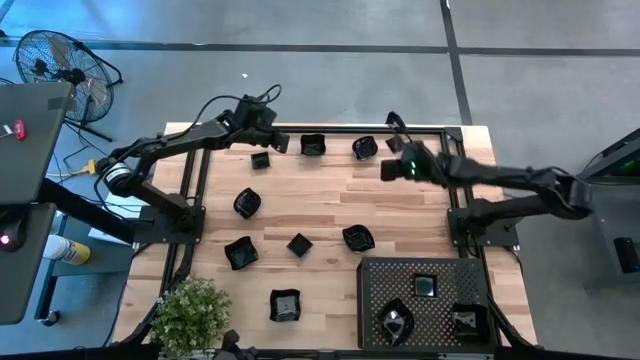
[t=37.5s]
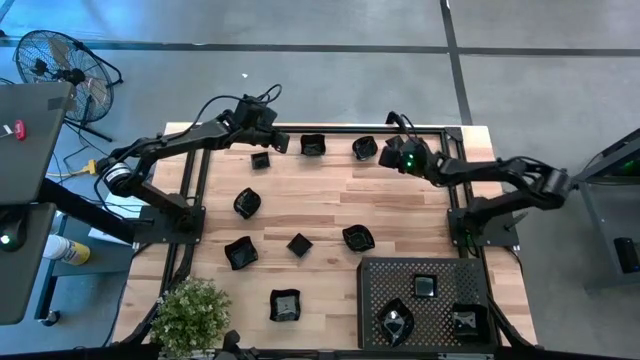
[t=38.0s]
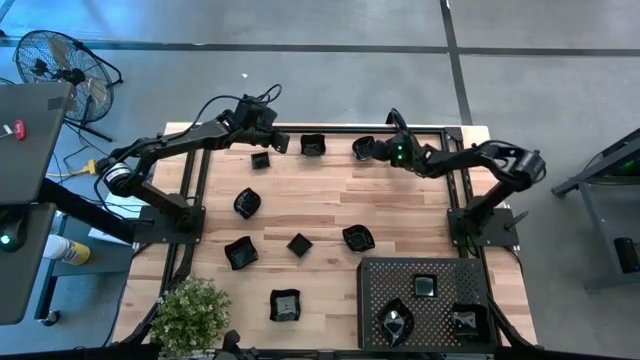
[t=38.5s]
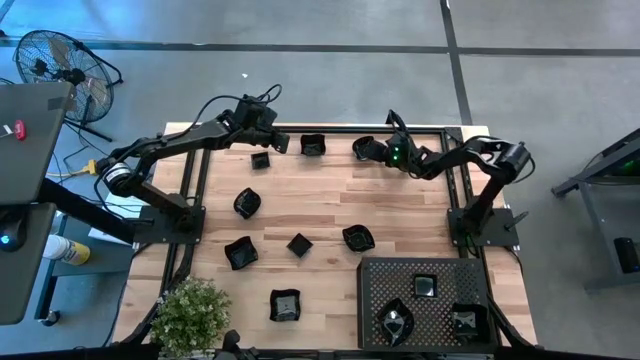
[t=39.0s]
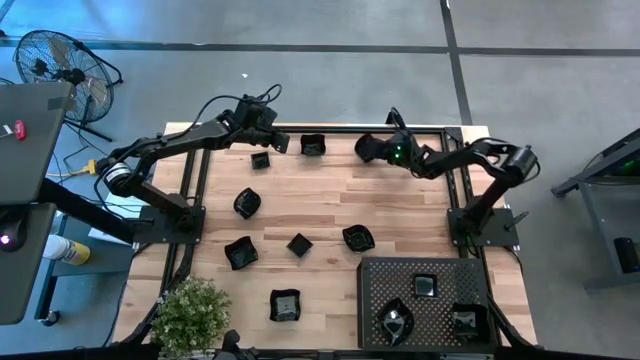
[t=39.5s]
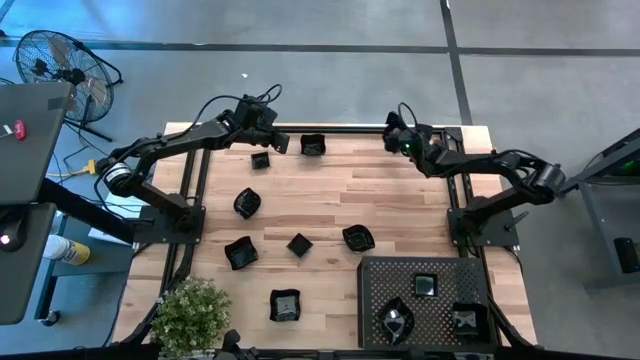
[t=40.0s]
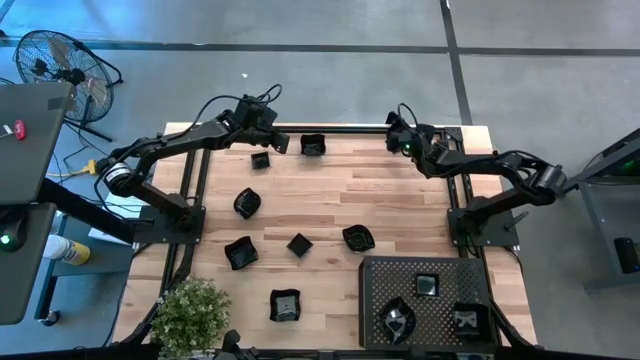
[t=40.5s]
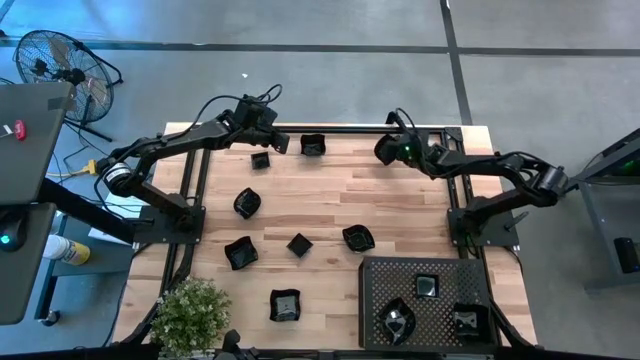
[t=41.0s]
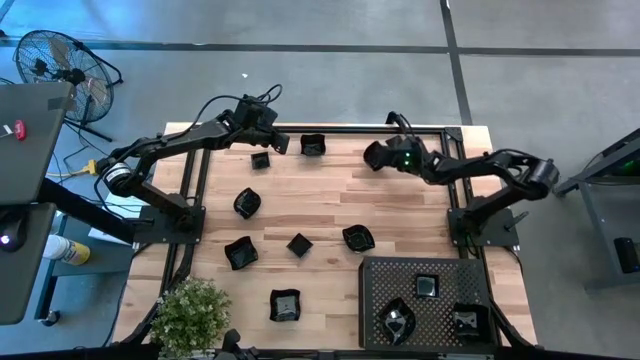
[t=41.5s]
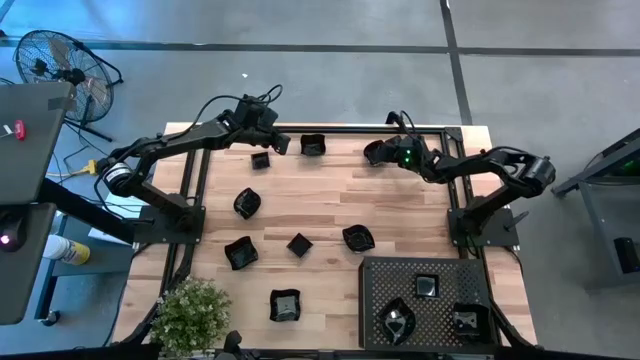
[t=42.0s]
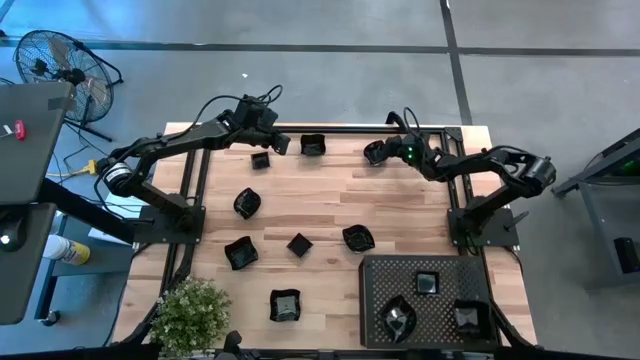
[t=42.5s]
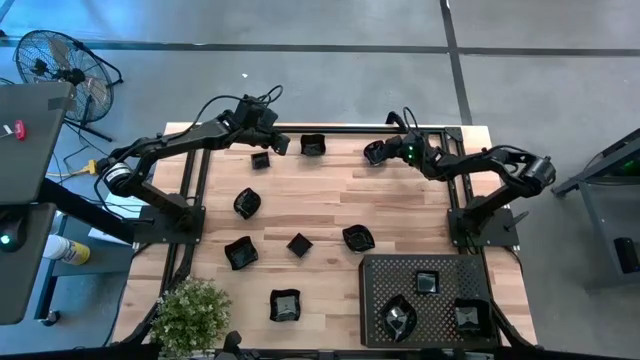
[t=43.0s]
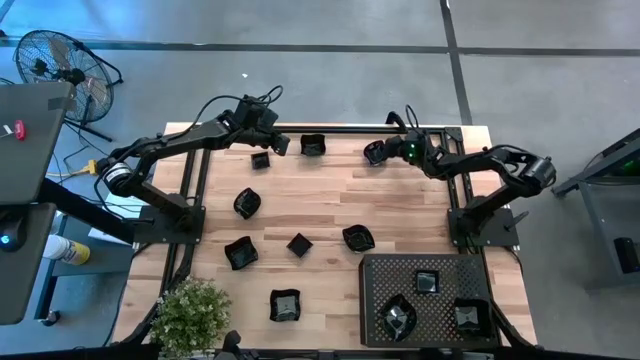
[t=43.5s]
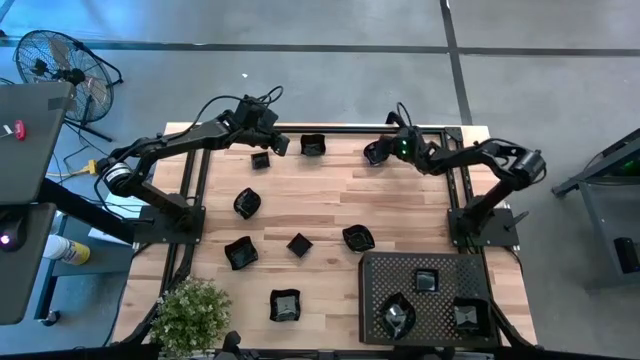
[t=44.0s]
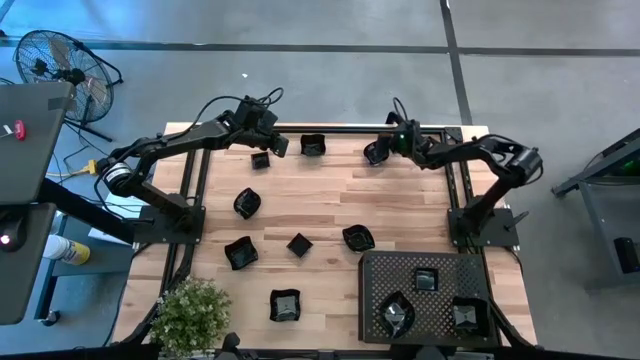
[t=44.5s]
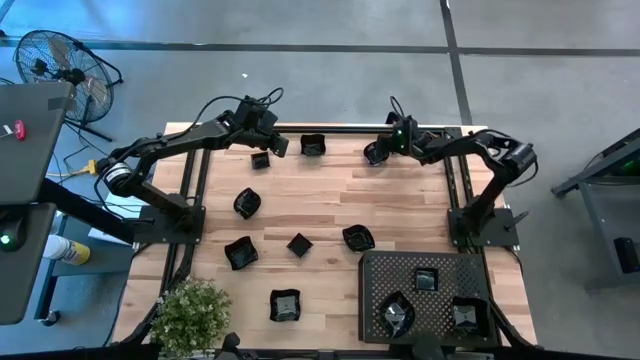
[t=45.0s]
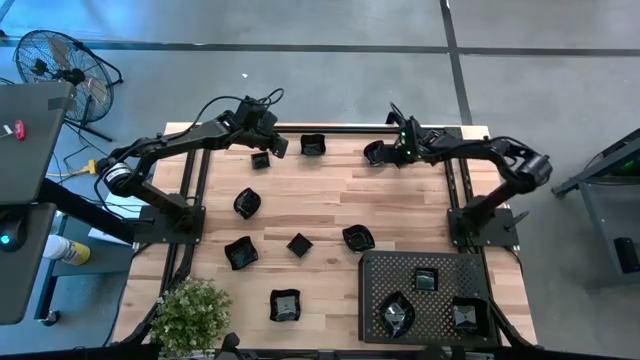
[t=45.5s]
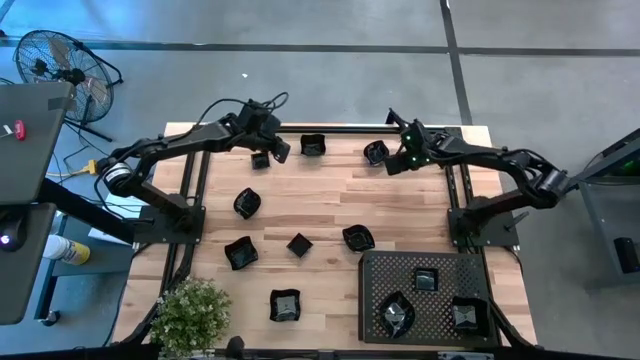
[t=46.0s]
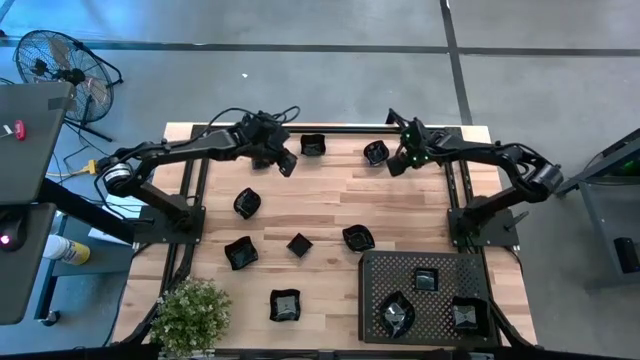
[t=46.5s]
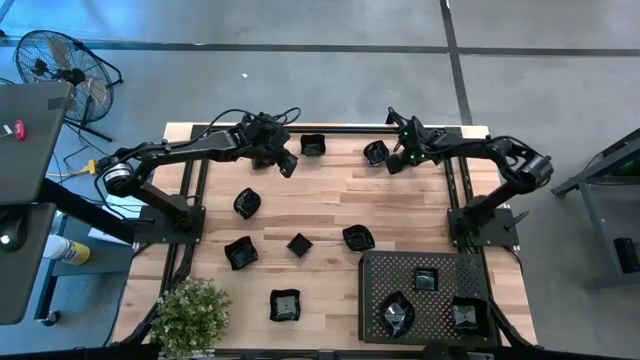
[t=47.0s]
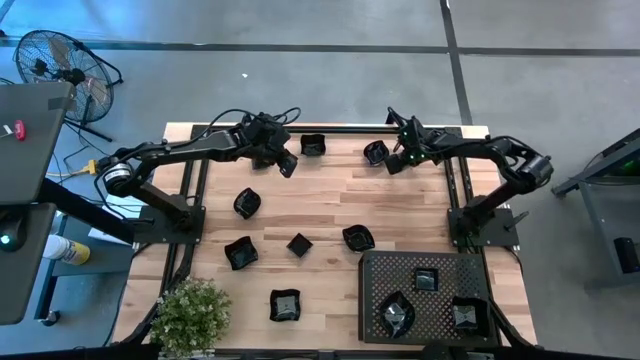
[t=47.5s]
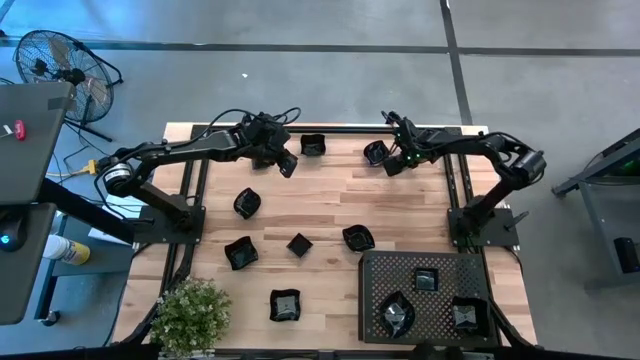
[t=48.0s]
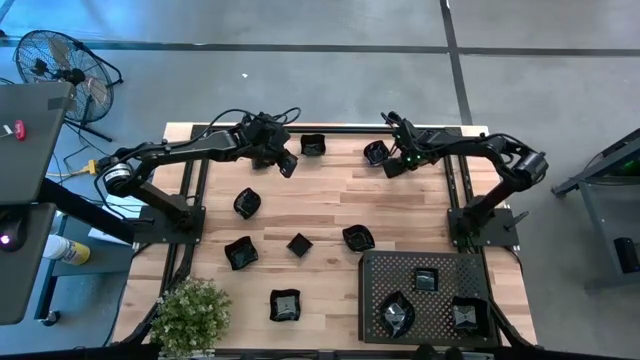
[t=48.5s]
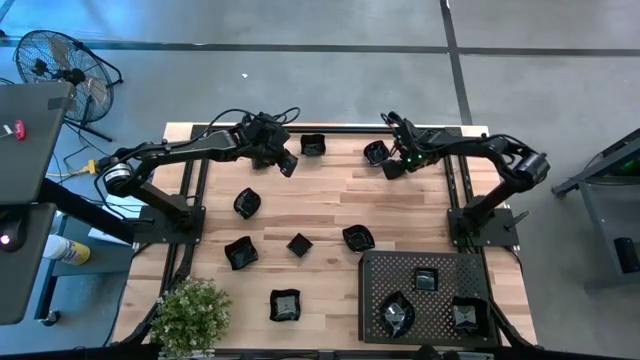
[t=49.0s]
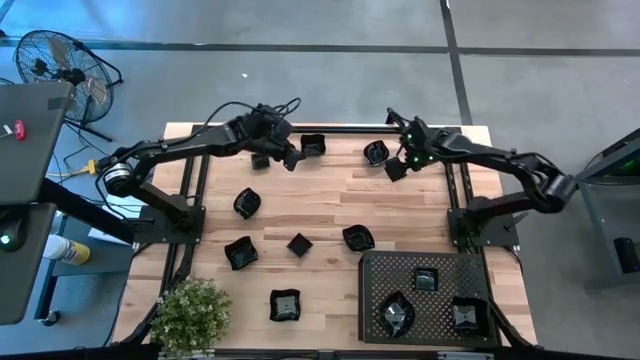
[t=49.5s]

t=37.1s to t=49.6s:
Task: Pick & Place Mini shaped plates
Stack the black square plate on top of the black square plate on the shelf

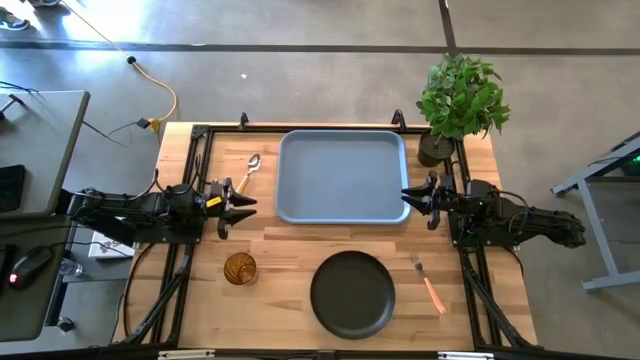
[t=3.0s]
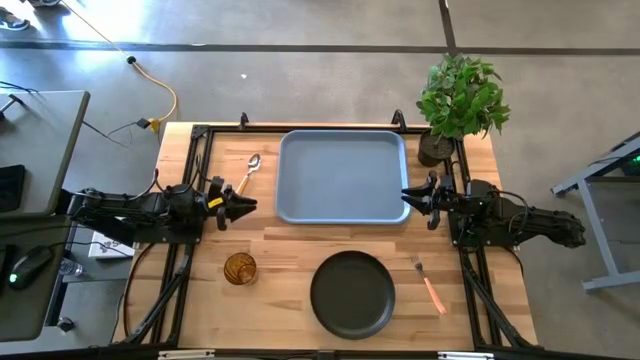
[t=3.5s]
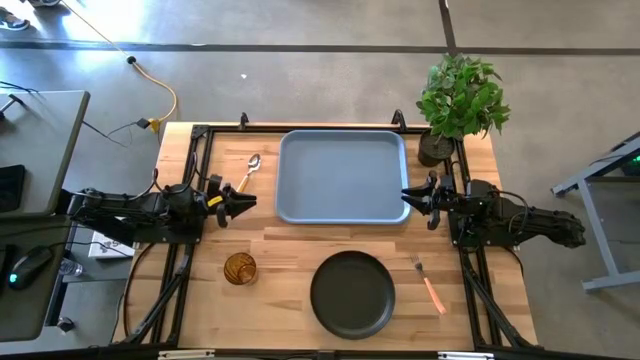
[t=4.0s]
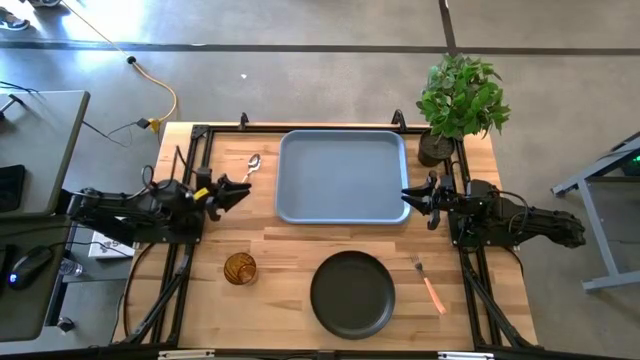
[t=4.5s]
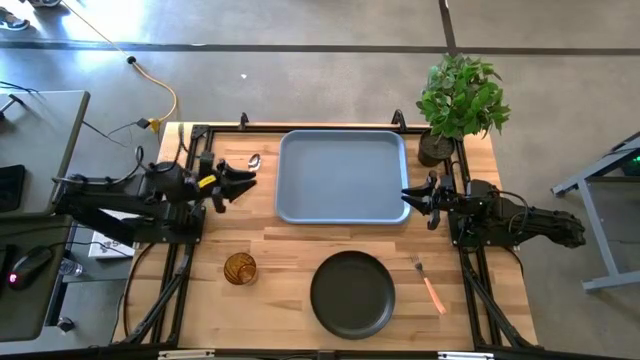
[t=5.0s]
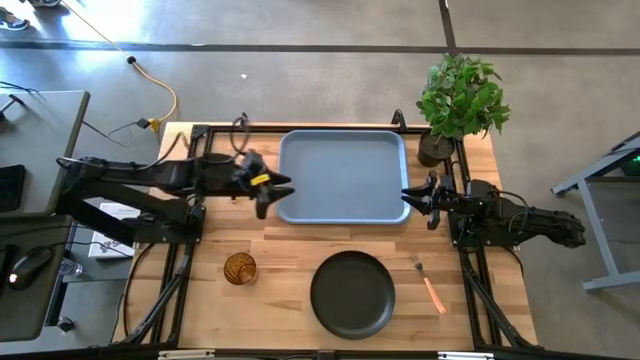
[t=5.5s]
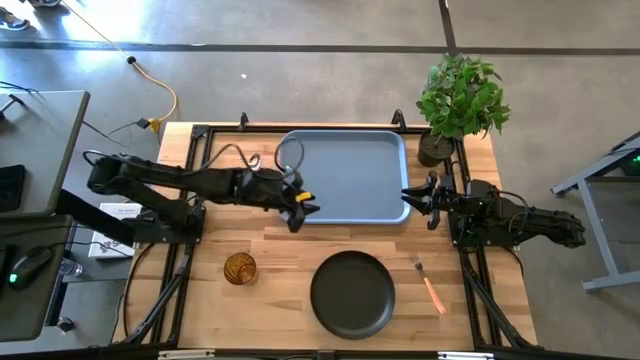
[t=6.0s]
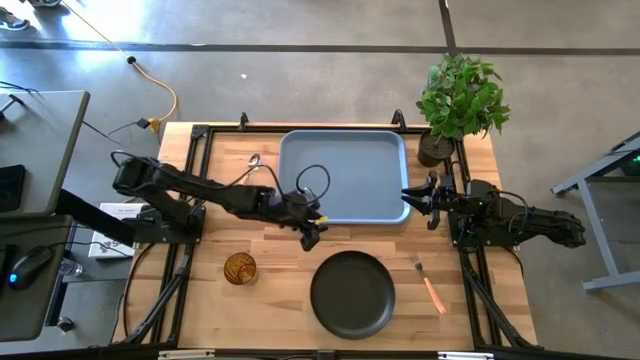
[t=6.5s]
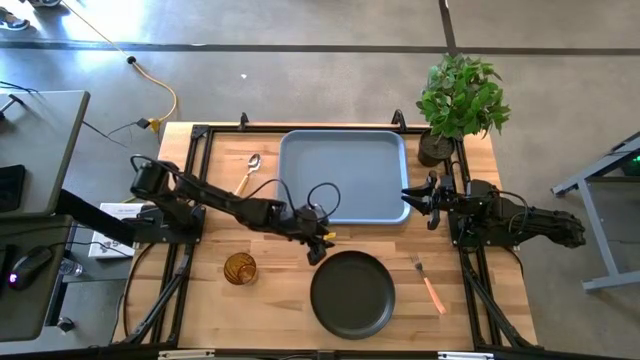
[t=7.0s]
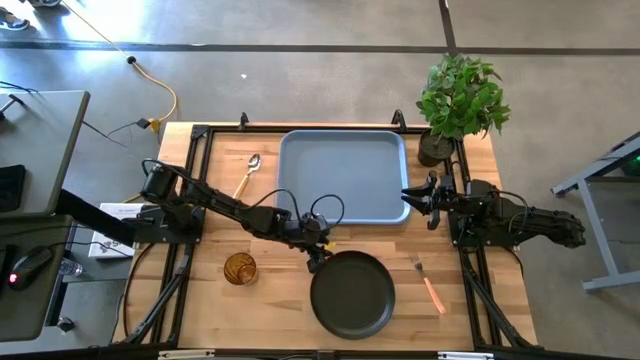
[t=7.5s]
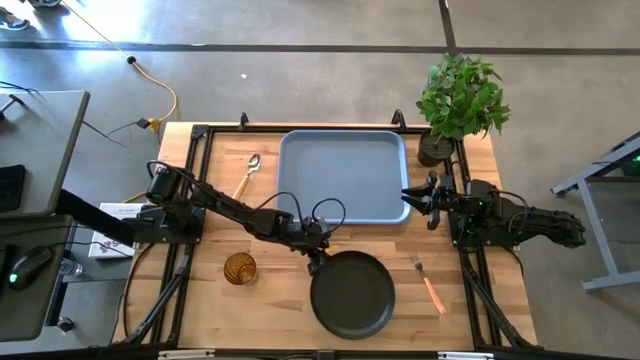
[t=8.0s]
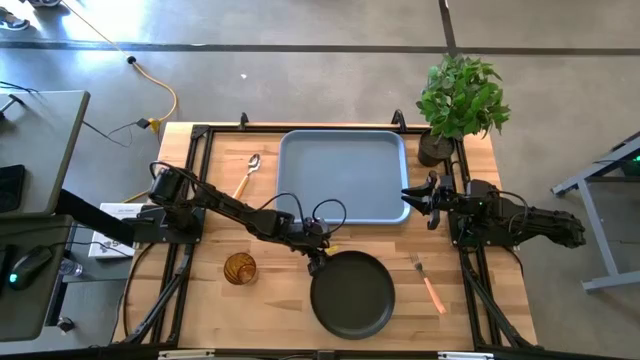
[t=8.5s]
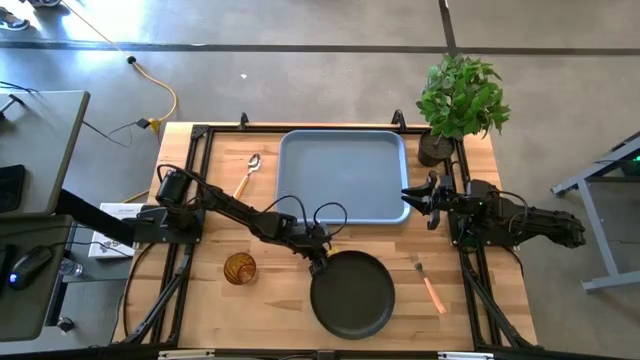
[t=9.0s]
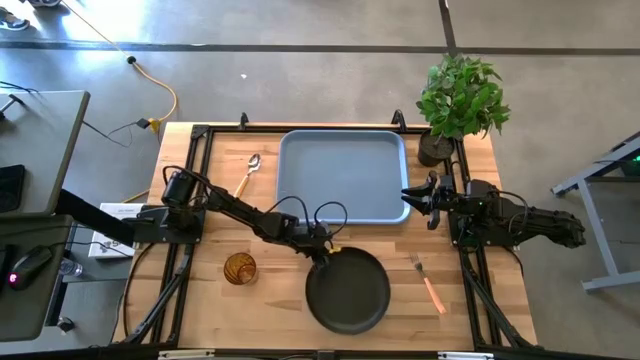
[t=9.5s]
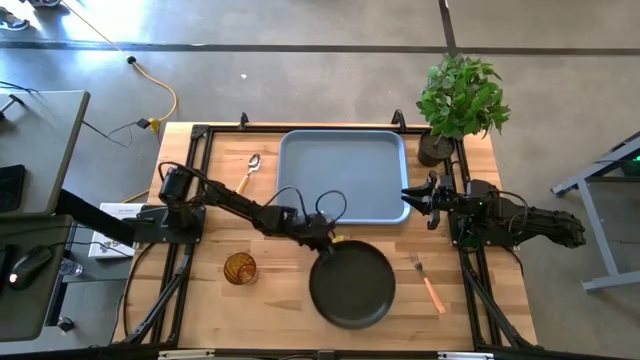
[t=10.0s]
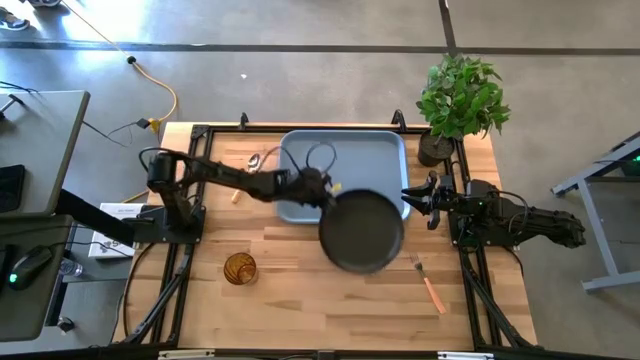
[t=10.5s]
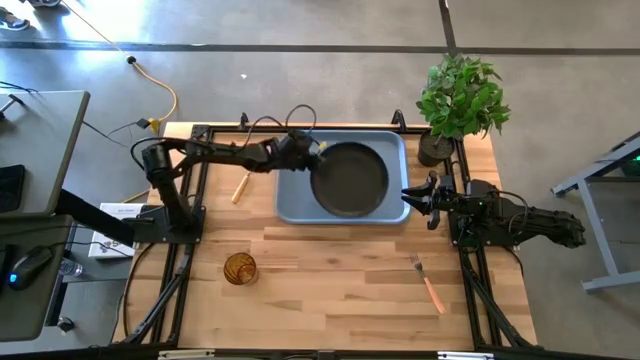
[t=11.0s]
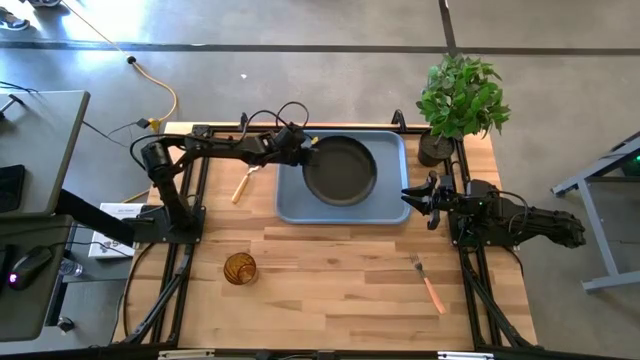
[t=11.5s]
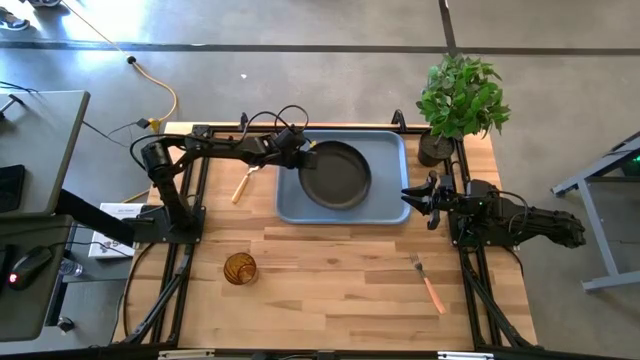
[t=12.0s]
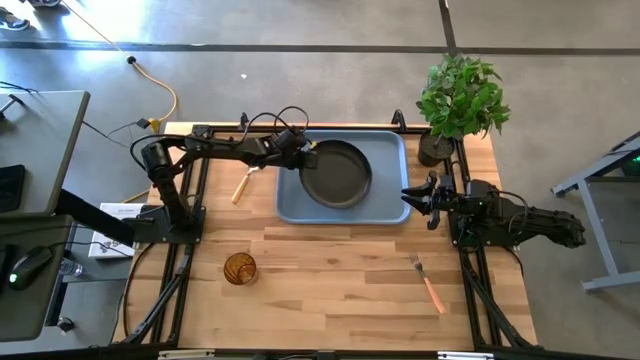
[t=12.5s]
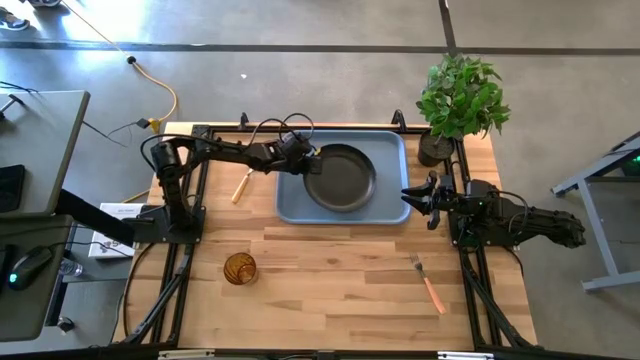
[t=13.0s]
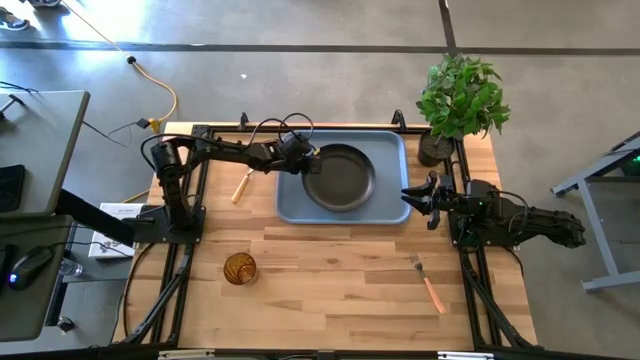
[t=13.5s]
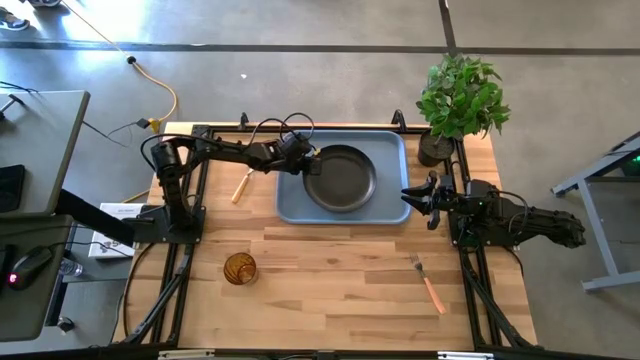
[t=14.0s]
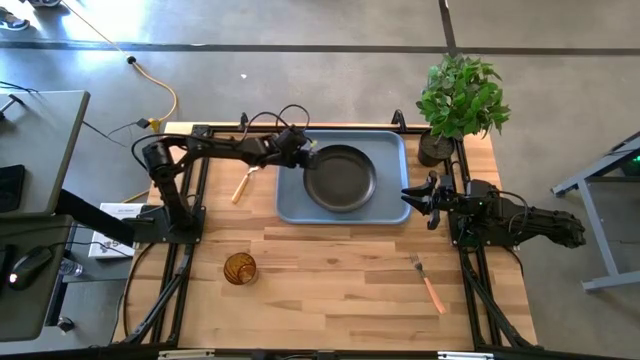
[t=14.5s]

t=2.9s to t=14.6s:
Task: Pick and place plate/cup/fork/spoon on tray
Put the black plate on the blue tray
